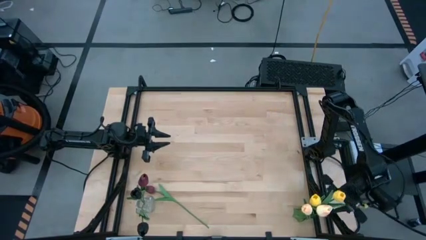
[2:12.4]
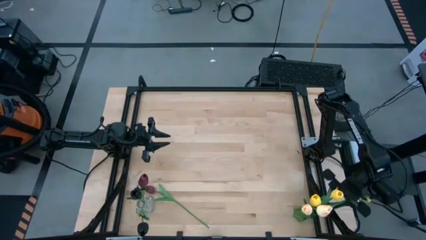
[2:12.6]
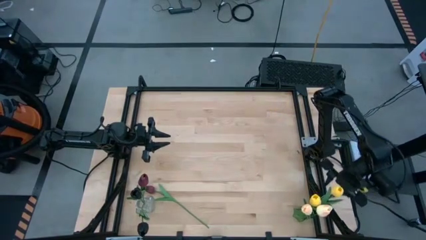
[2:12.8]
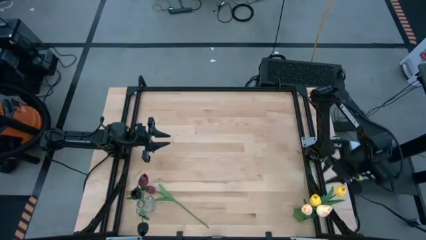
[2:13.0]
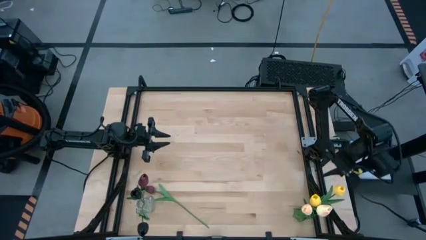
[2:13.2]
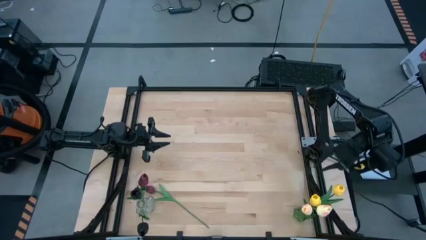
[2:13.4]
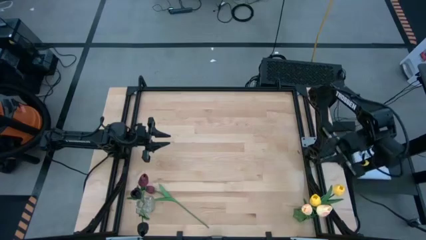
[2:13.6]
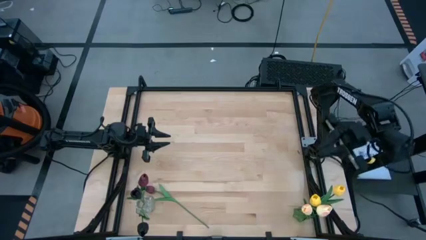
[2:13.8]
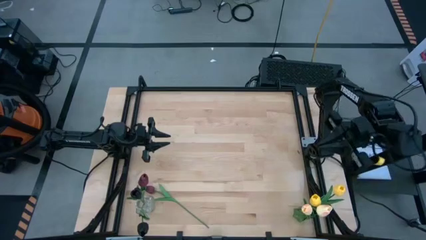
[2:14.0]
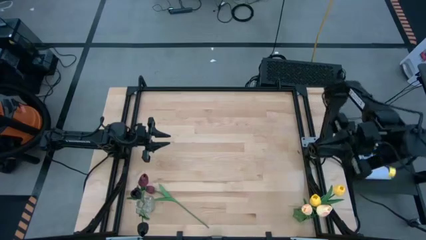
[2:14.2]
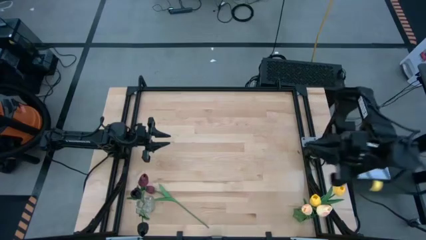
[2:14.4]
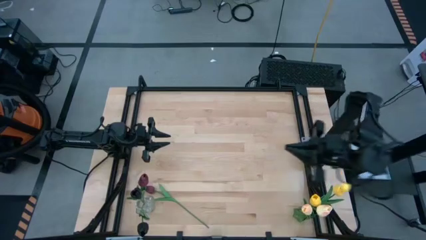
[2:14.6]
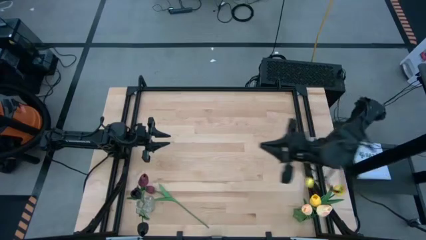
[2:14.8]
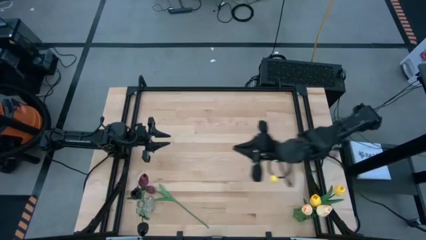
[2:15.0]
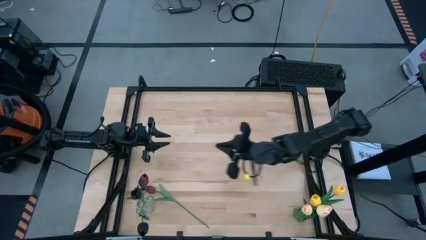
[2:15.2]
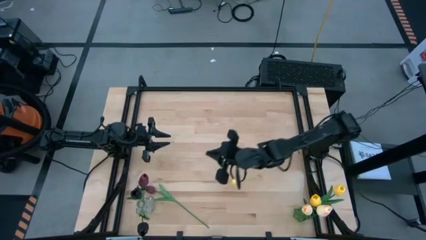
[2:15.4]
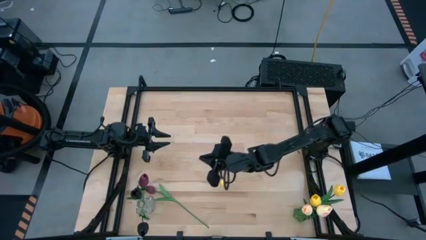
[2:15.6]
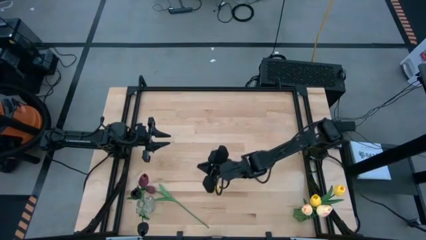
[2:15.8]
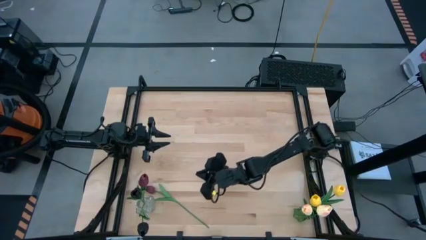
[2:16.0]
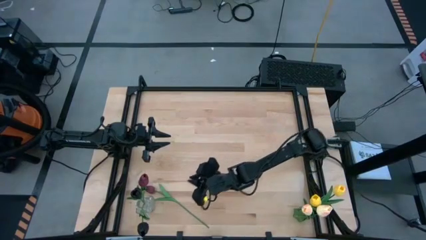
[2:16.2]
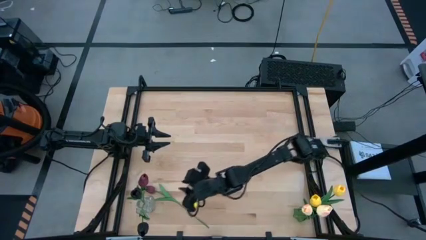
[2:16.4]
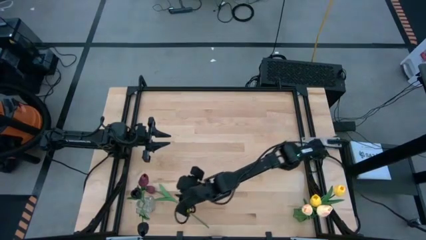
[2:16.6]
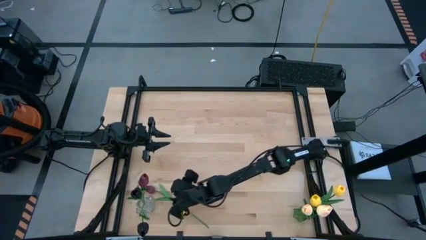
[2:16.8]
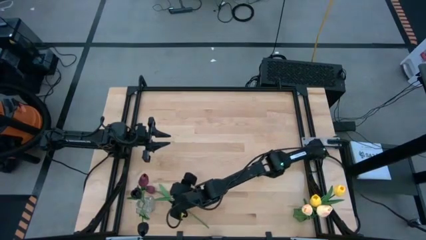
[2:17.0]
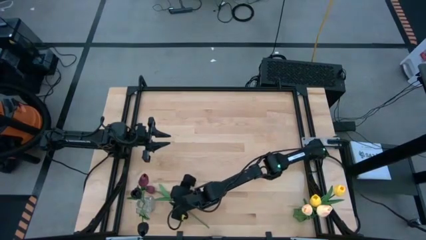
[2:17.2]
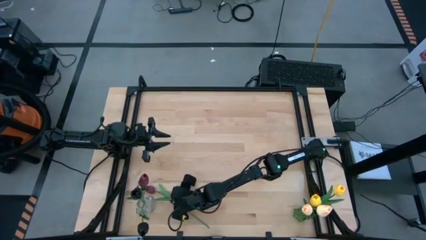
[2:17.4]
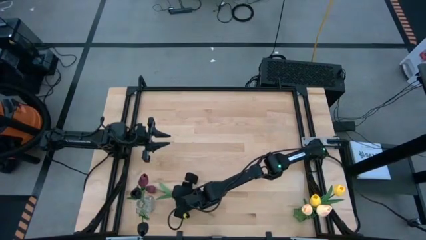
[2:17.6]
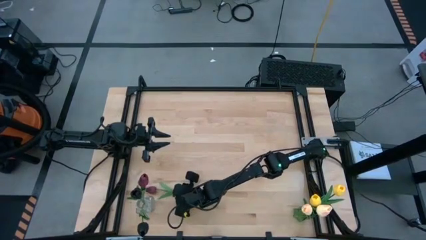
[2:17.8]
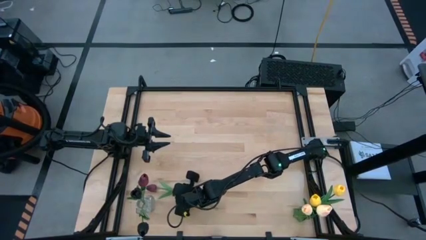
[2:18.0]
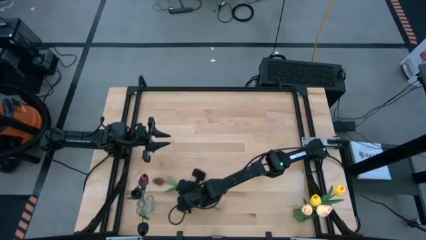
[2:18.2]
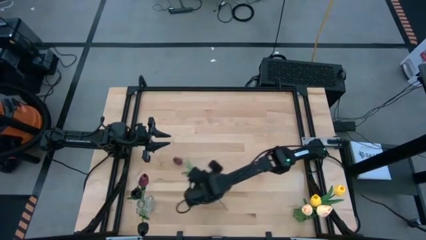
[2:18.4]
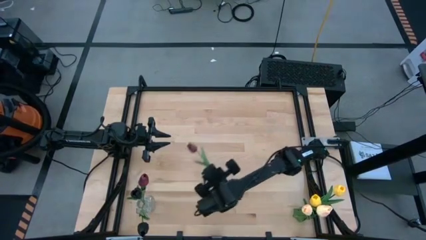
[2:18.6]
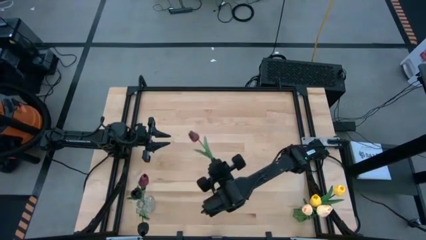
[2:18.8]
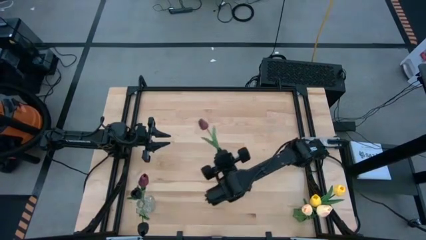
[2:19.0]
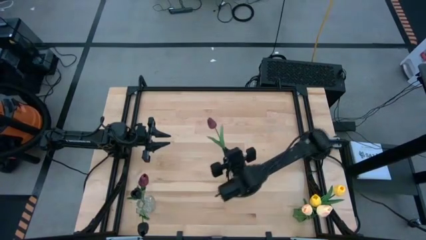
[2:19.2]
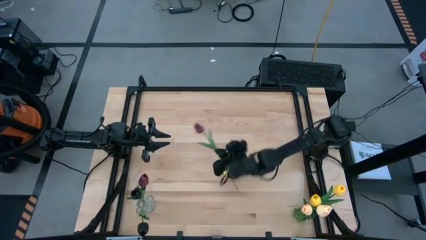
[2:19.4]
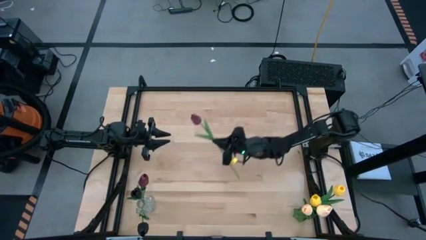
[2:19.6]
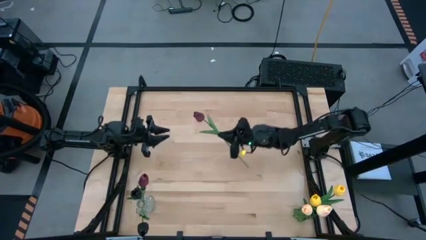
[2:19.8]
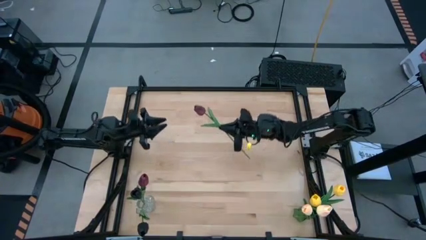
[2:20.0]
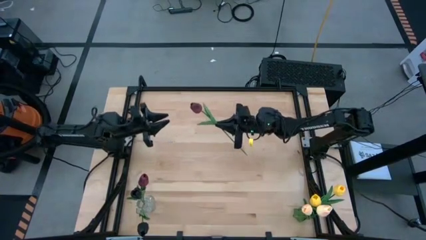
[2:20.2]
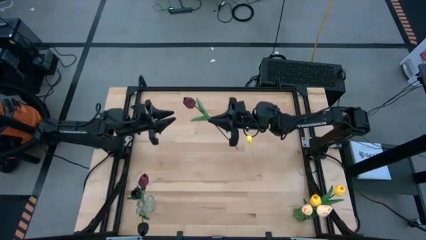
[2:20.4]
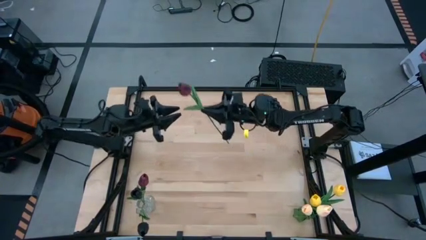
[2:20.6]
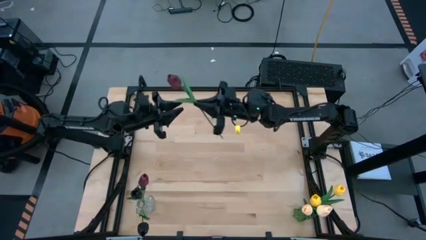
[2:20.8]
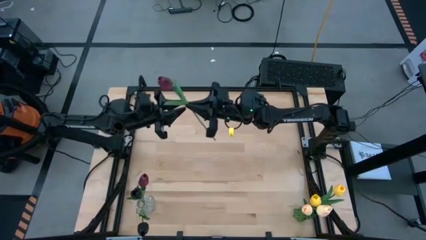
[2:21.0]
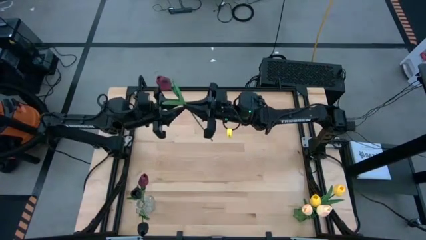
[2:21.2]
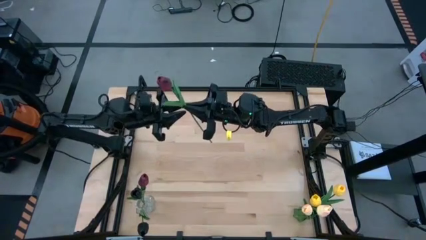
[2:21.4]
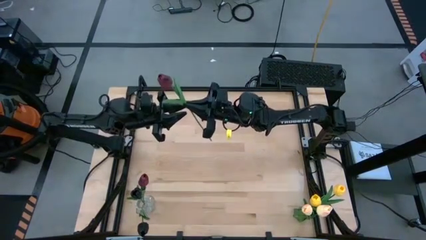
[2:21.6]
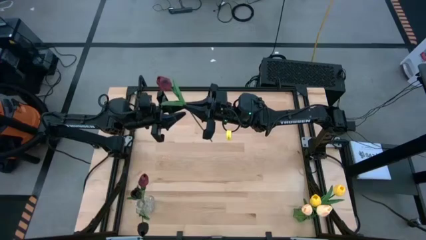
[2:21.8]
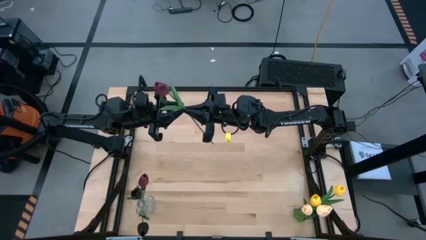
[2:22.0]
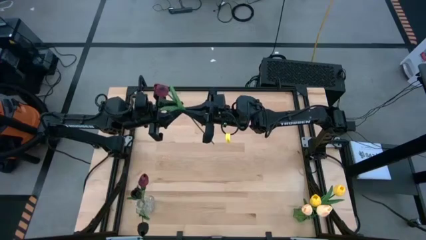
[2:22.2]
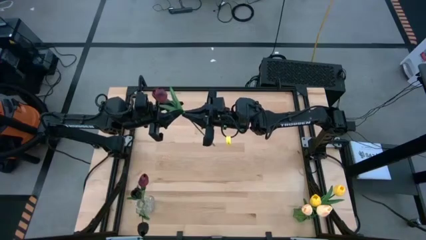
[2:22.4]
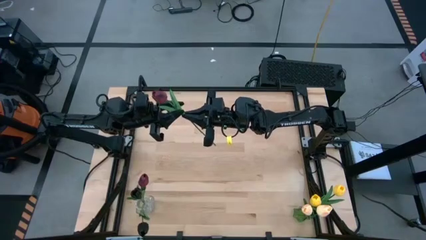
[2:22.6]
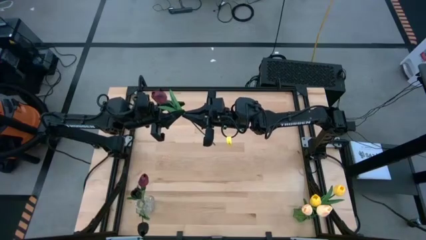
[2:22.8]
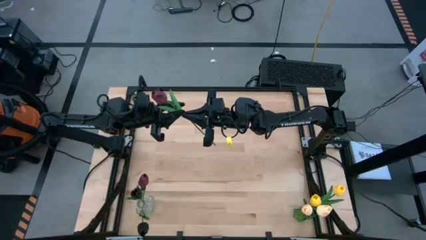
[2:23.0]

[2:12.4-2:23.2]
Task: Sort flowers into vase by color
Put the red tulip into the transparent vase

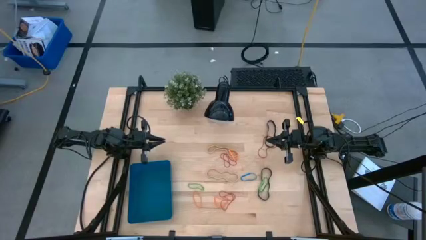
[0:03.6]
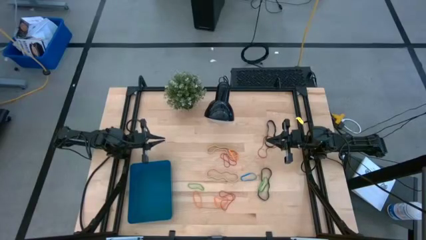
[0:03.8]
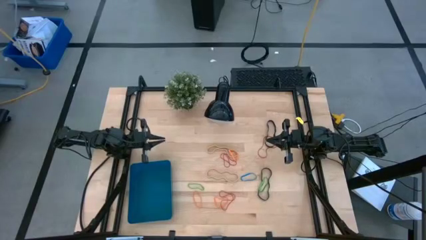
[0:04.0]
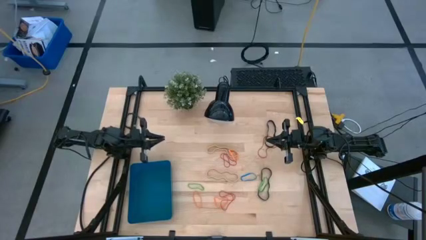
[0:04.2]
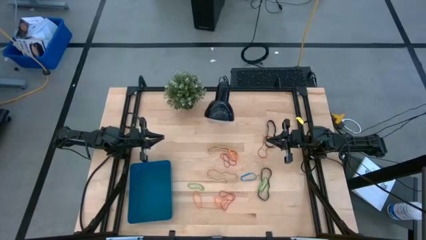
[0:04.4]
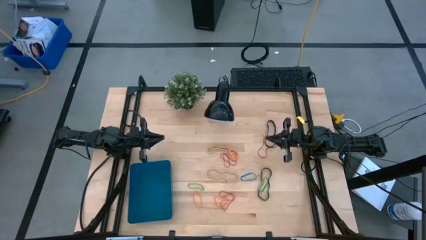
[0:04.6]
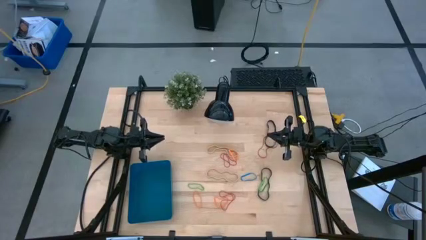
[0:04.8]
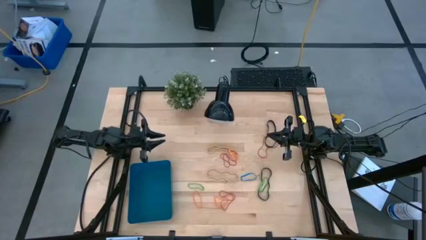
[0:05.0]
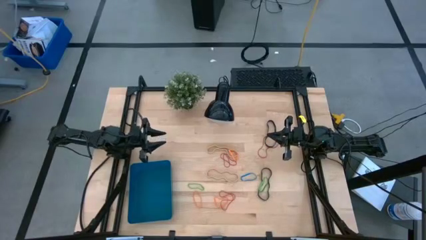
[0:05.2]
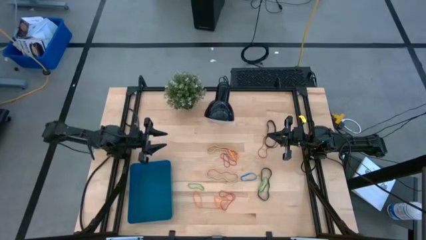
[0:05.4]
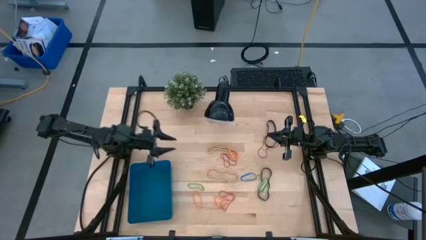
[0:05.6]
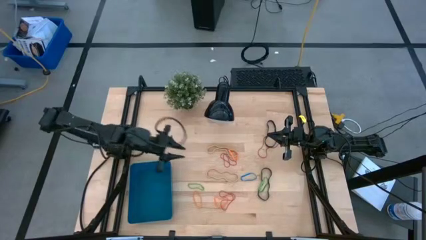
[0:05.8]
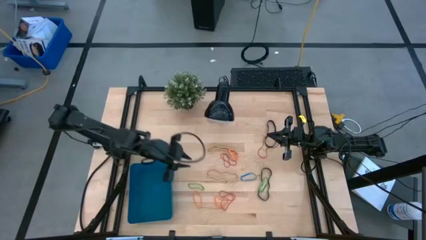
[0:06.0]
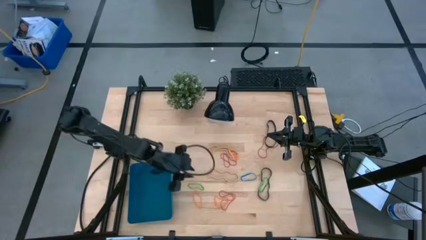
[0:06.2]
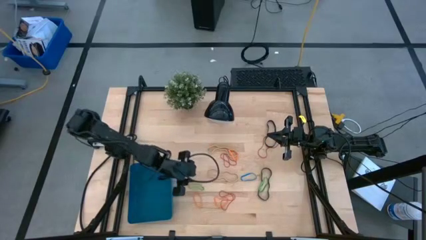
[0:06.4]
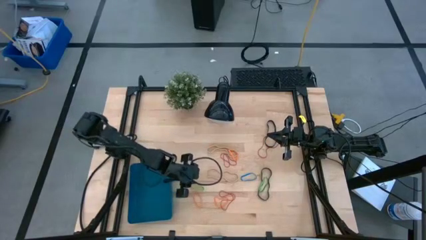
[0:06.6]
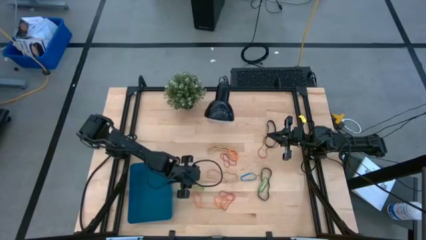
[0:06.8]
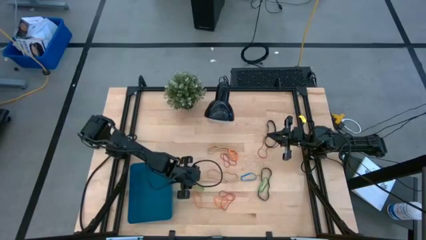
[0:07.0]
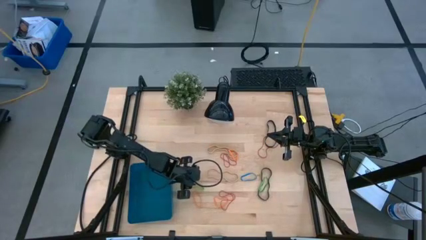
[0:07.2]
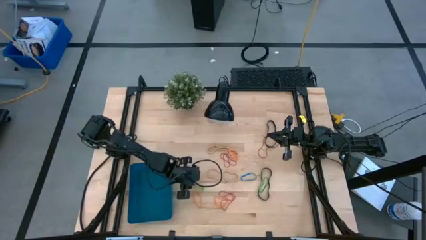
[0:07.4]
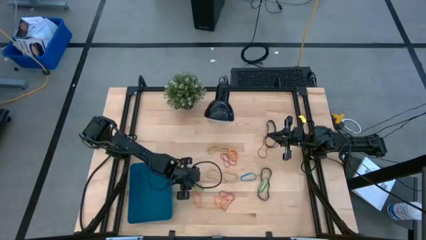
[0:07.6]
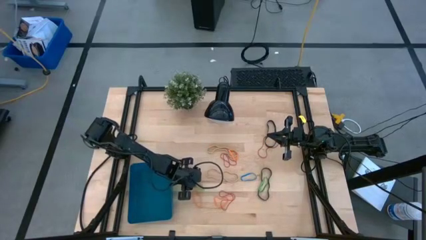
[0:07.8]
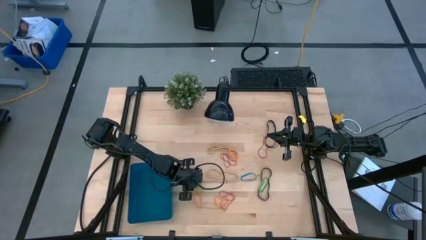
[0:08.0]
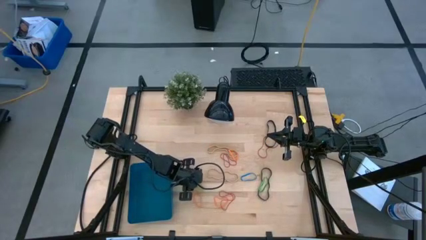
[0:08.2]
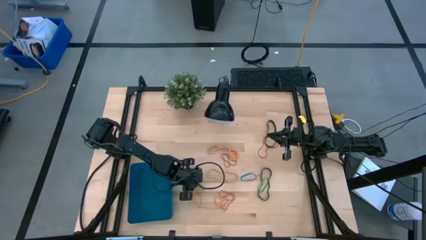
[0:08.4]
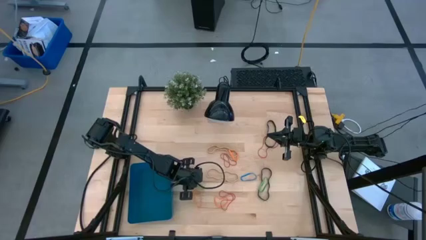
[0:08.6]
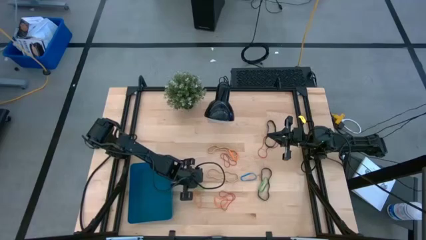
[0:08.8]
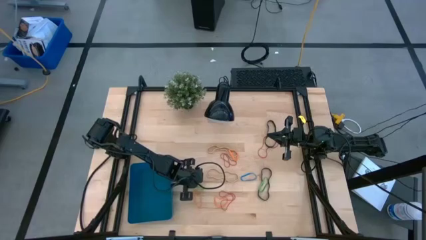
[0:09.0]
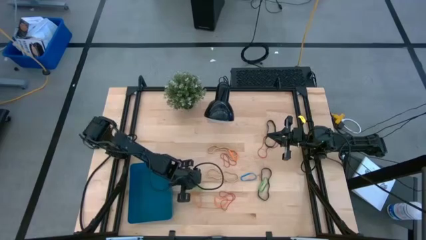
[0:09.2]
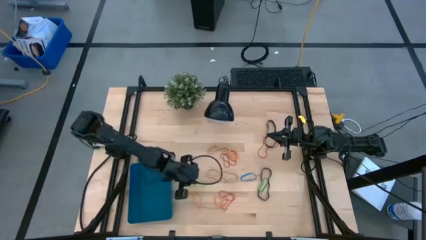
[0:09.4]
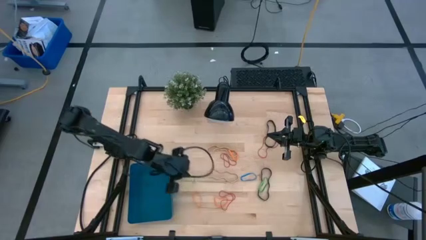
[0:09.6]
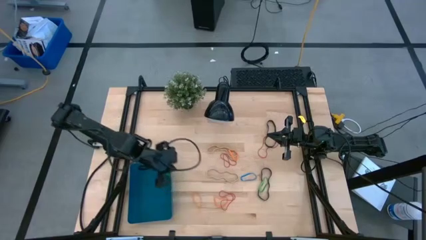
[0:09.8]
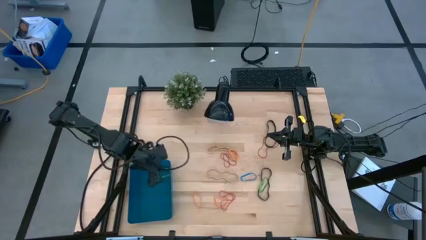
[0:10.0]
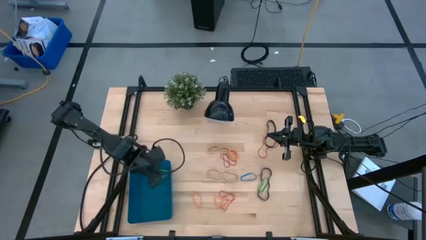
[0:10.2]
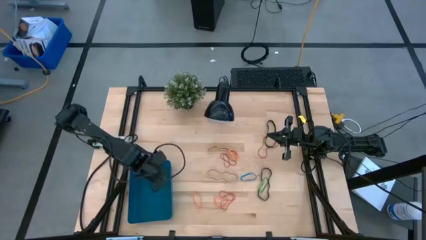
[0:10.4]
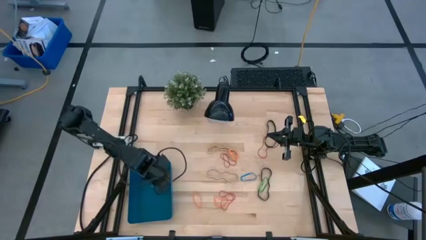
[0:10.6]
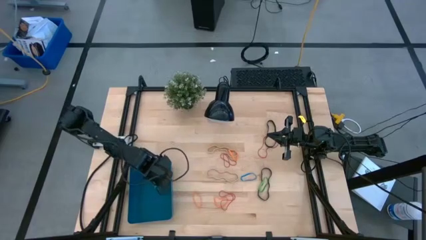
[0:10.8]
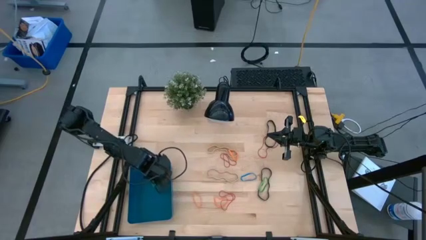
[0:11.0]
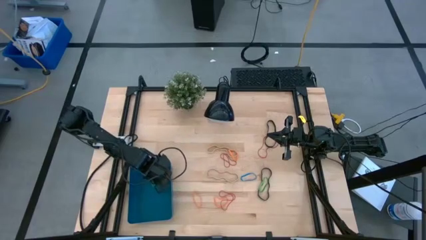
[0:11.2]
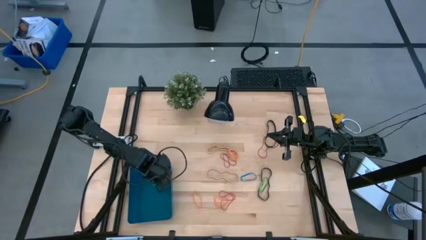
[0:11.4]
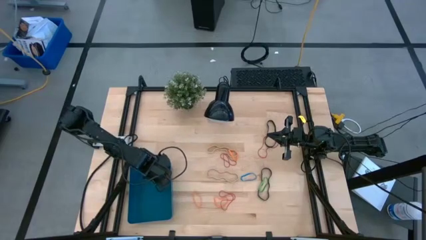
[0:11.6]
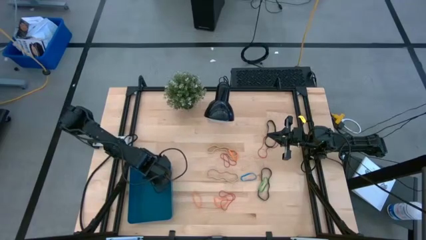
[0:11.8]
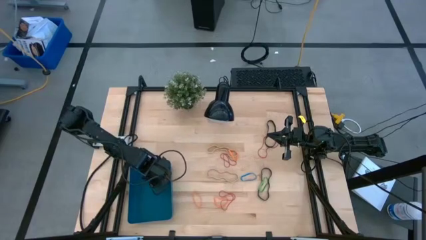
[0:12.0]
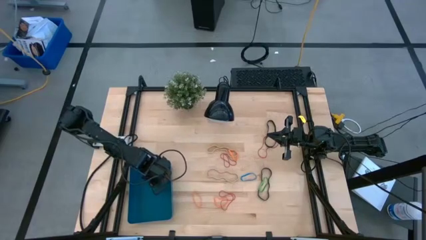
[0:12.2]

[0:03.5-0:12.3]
Task: Pick and place rubber bands into bin
Put the left green rubber band into the blue bin
